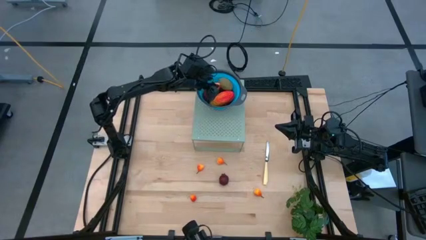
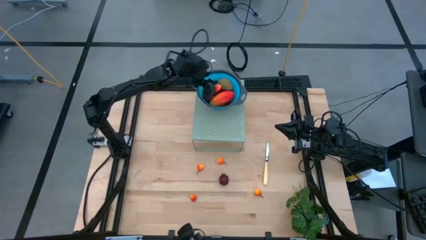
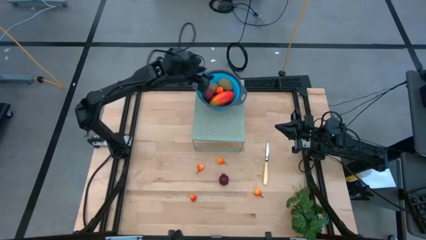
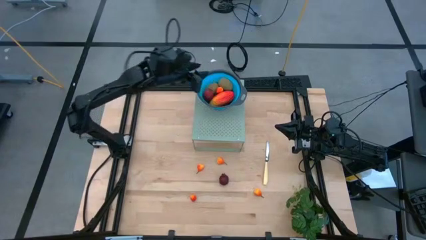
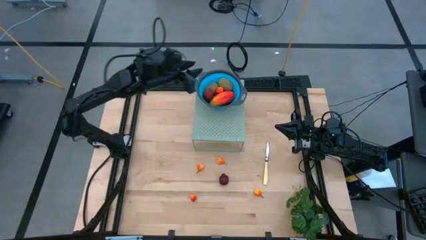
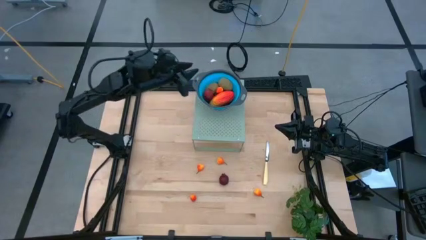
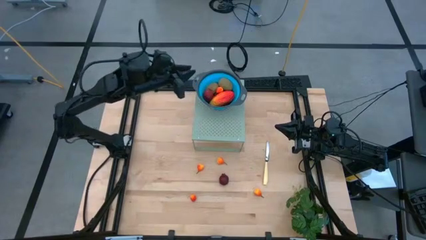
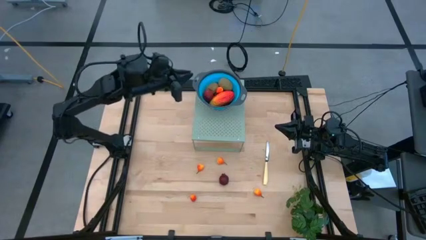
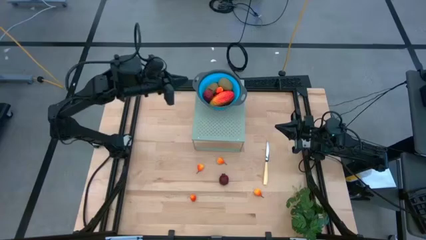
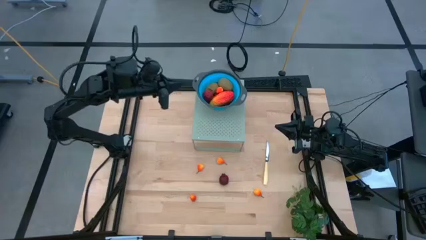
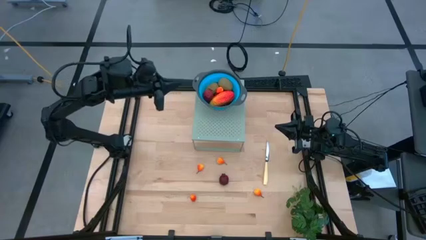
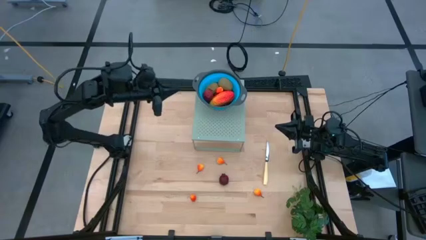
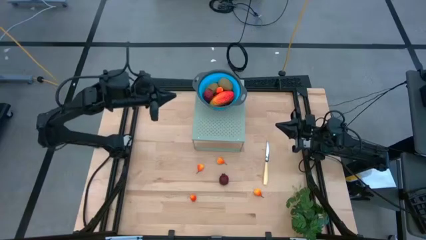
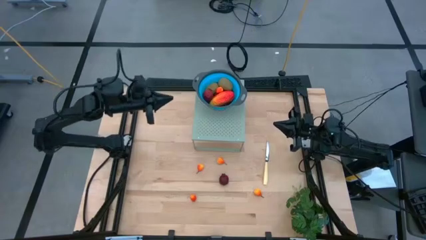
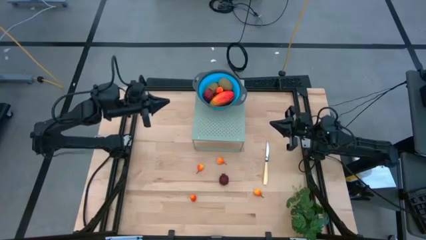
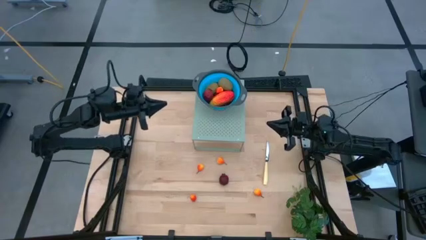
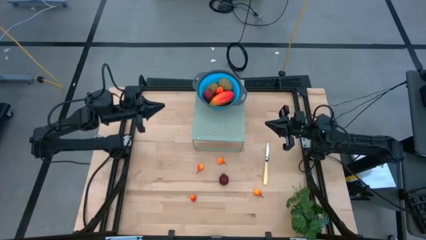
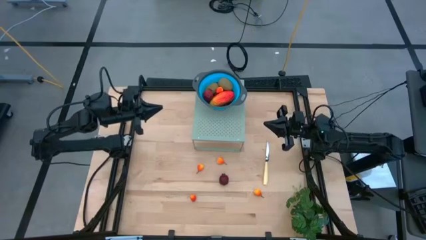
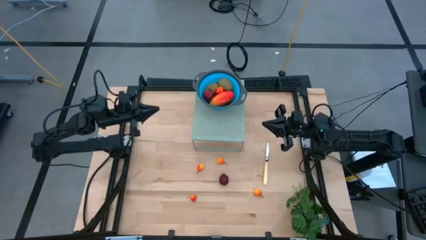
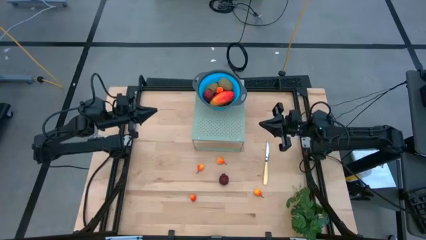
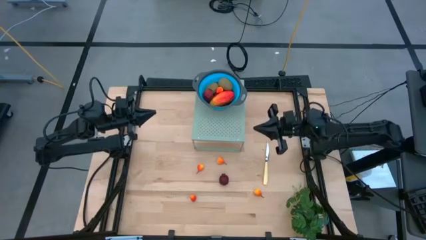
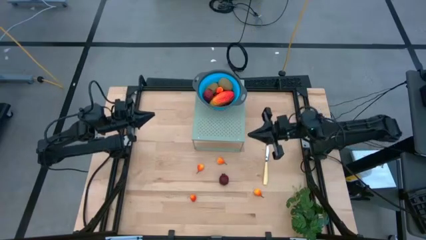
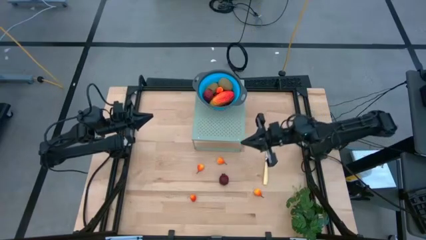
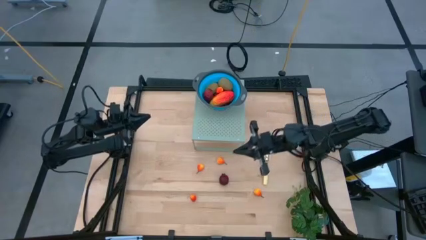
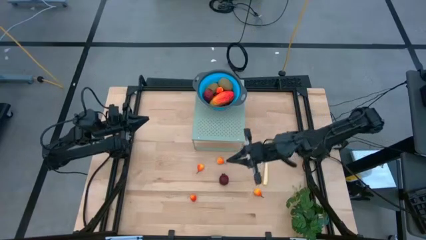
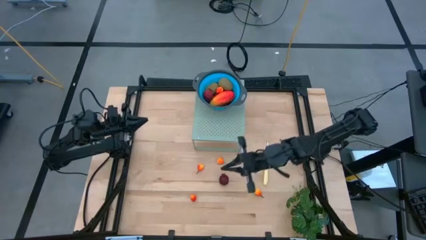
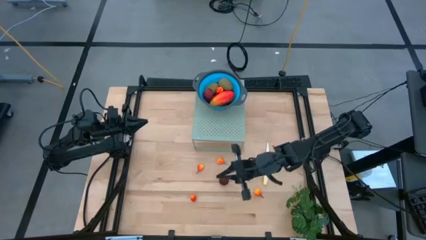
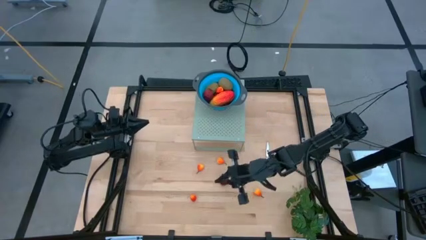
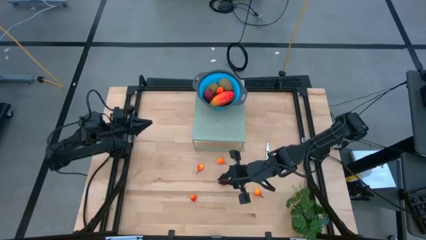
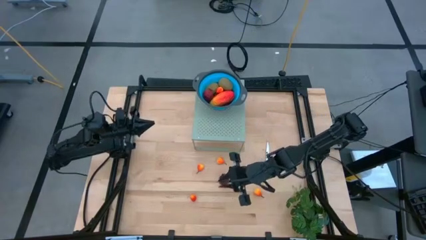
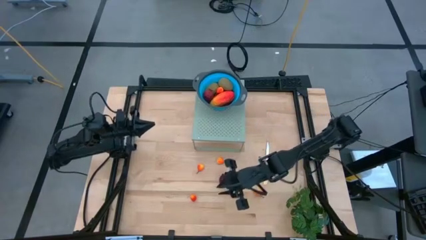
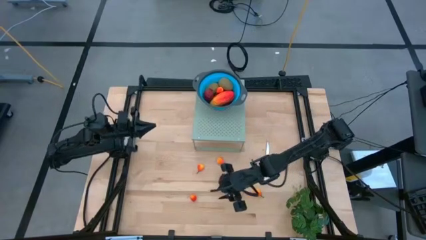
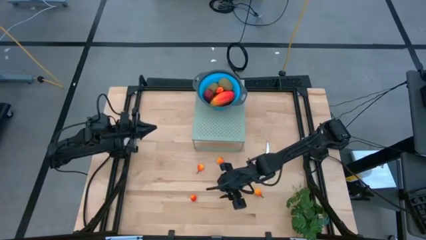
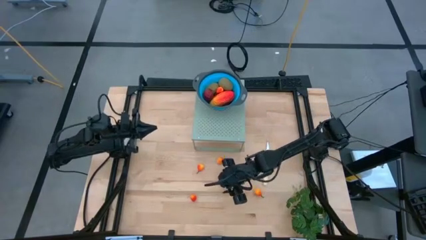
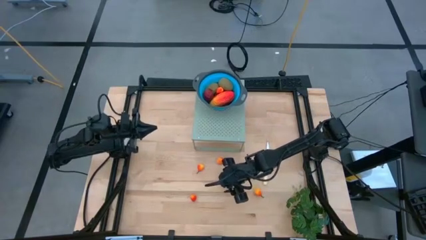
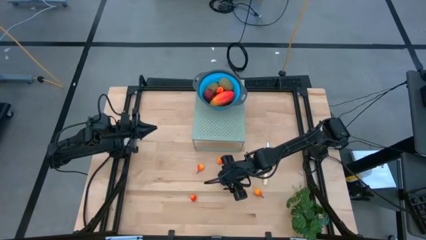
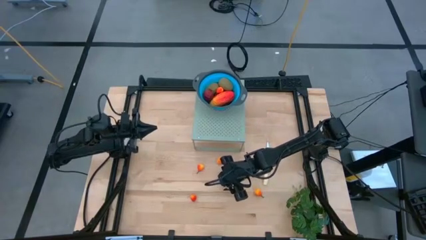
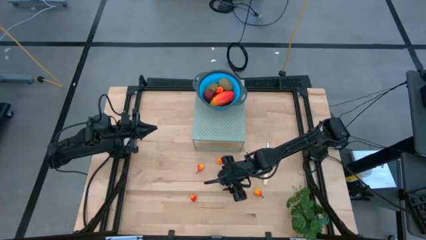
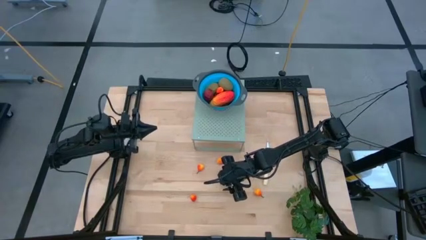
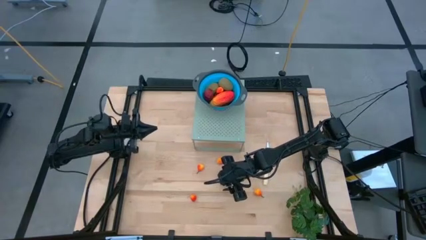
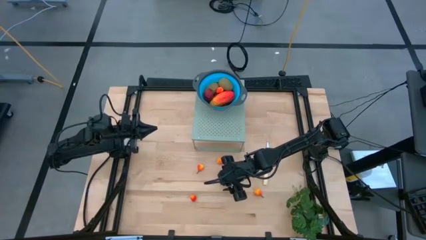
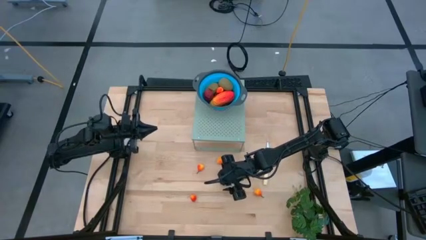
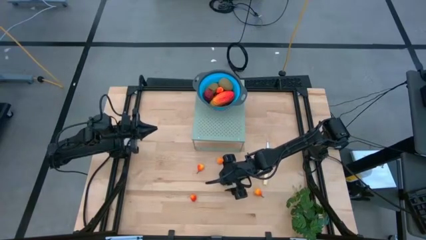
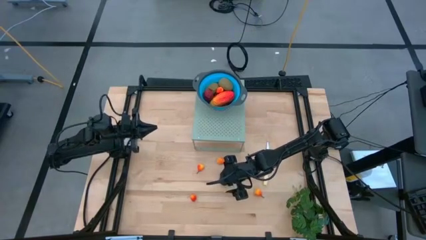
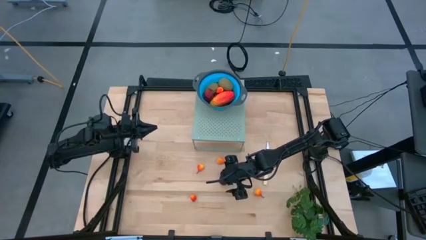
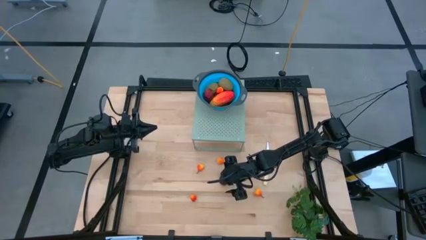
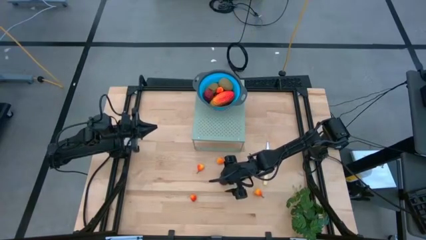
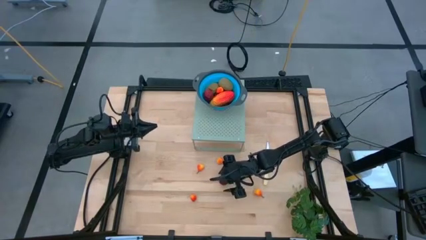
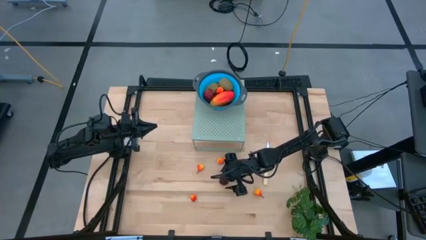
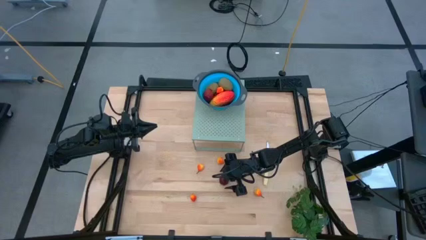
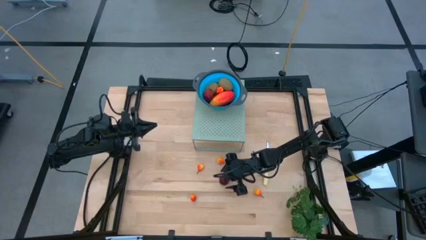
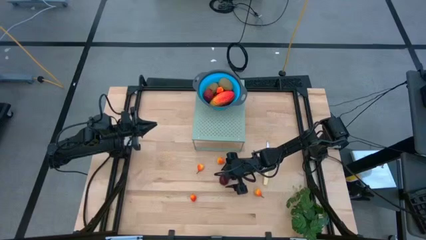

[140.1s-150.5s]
Task: Pick & Place Fruit
Put the pomegranate into the blue strainer bowl on the shelf

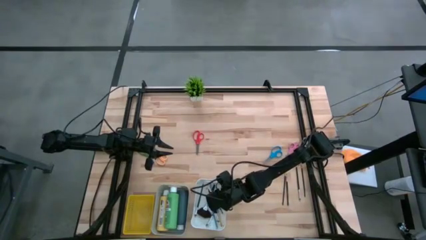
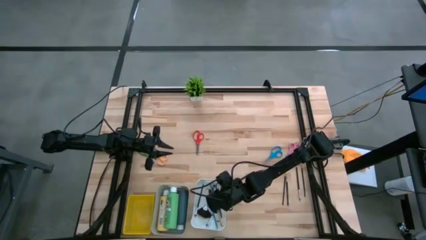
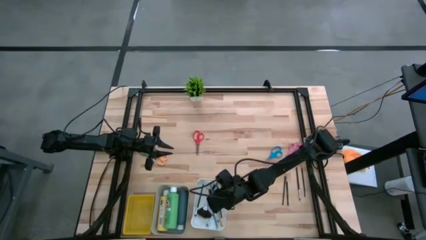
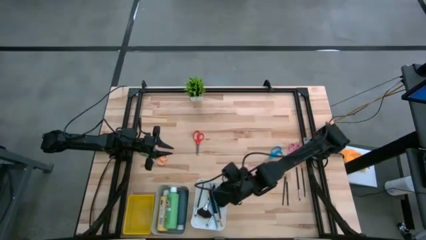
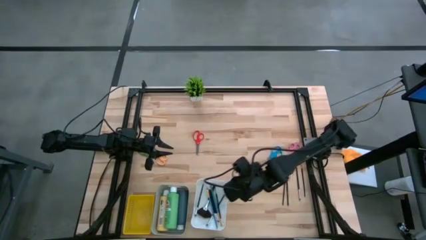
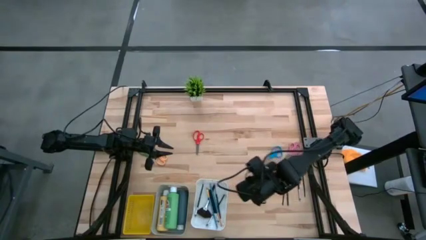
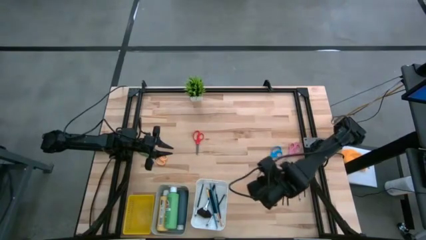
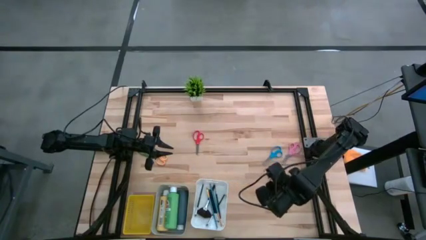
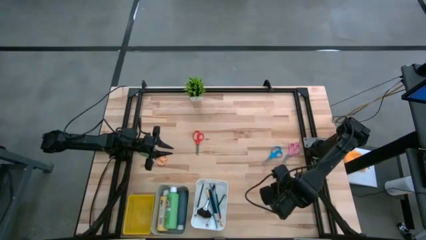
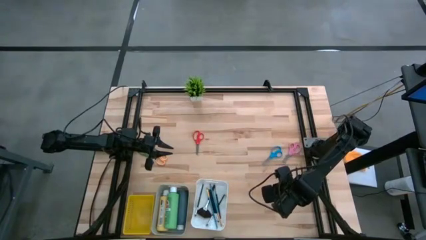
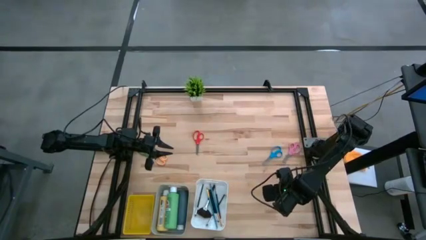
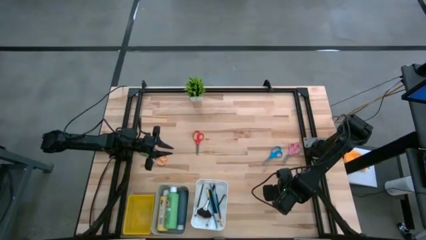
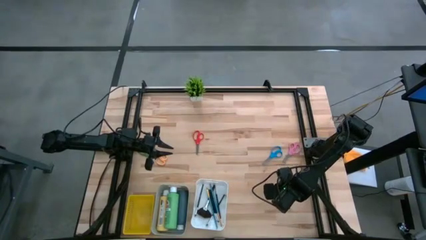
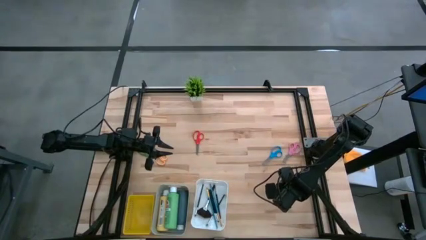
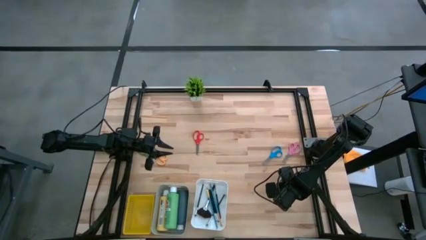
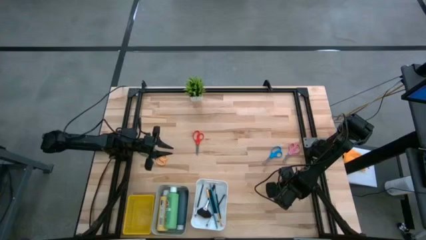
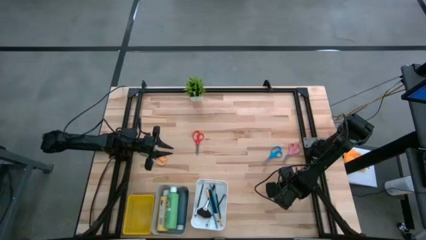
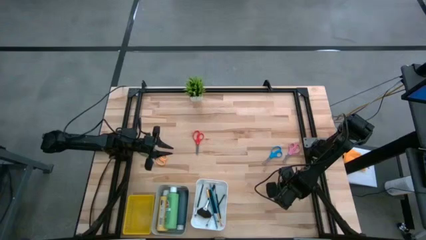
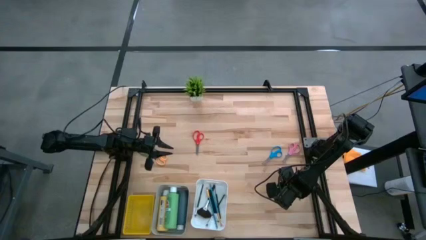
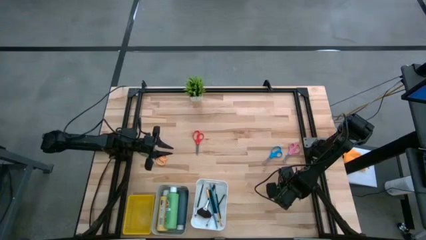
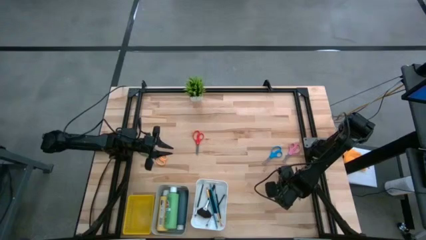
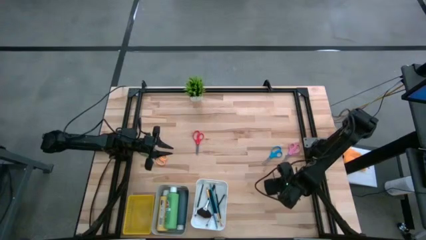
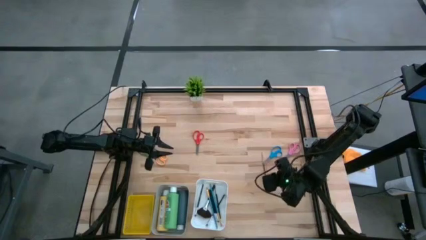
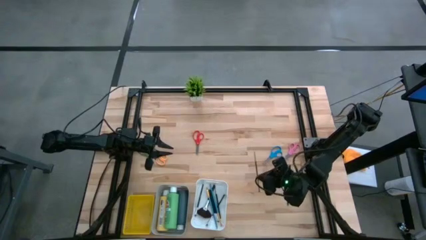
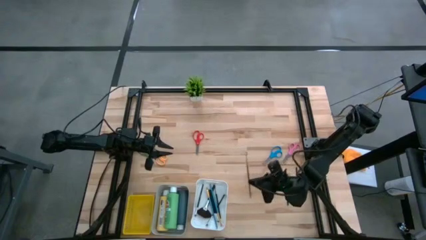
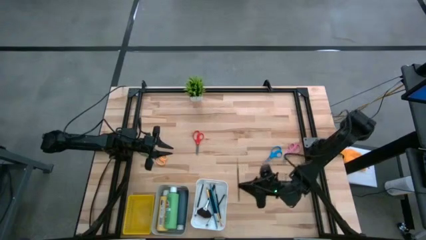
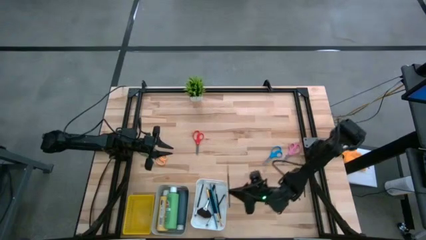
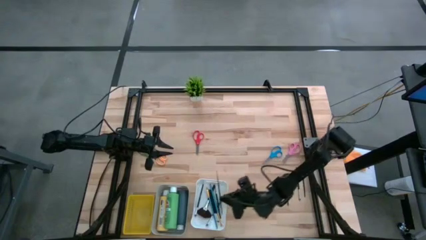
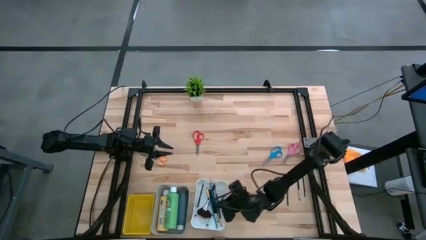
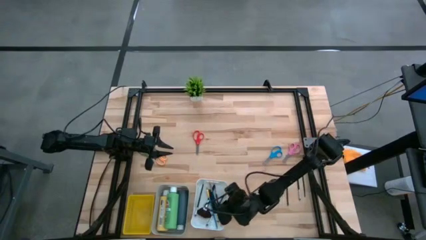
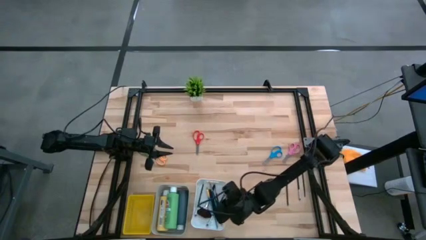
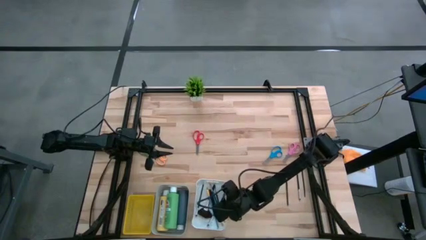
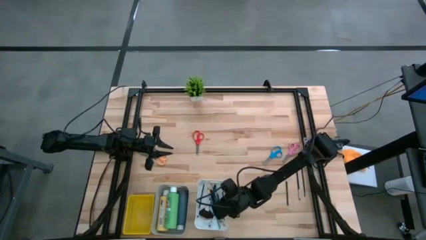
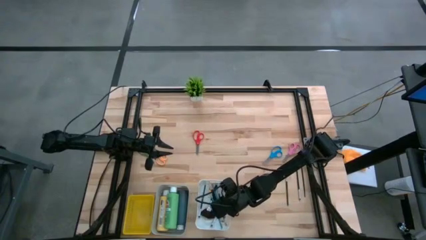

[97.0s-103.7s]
Task: Pick & Place Paint Supplies
Put the black paint brush into the white bin
